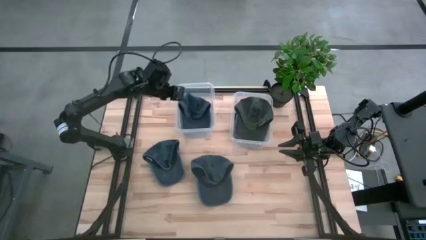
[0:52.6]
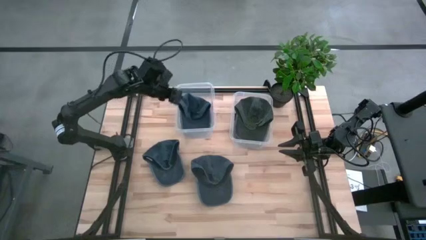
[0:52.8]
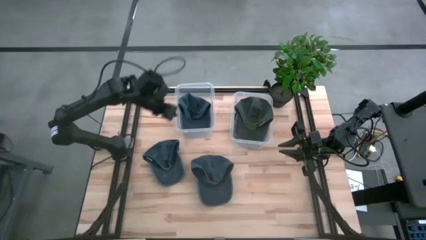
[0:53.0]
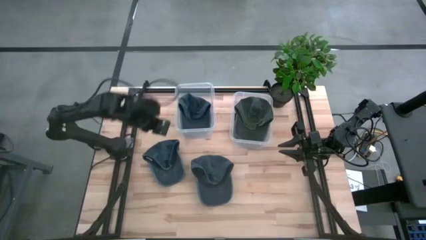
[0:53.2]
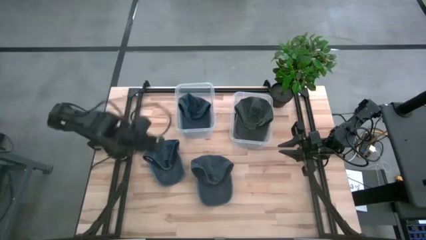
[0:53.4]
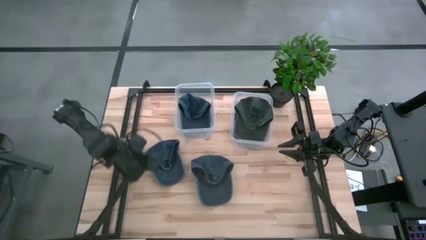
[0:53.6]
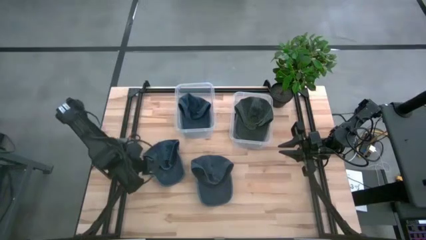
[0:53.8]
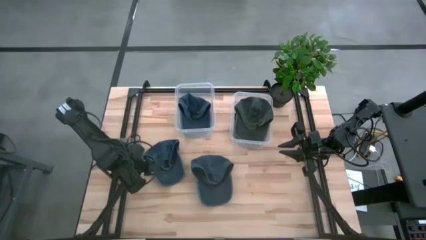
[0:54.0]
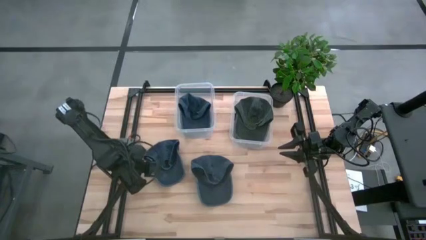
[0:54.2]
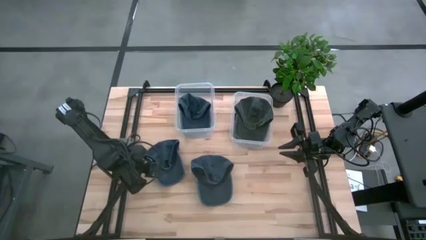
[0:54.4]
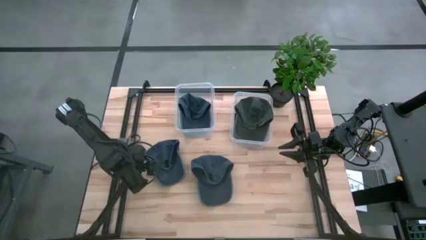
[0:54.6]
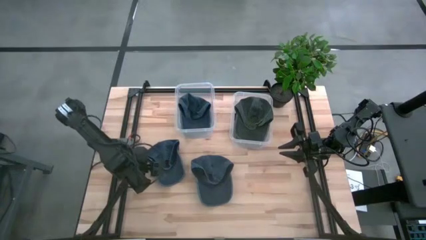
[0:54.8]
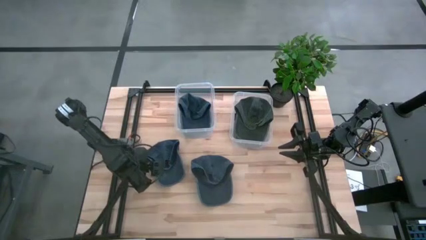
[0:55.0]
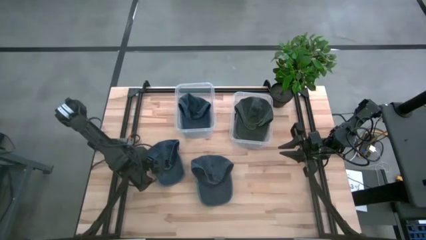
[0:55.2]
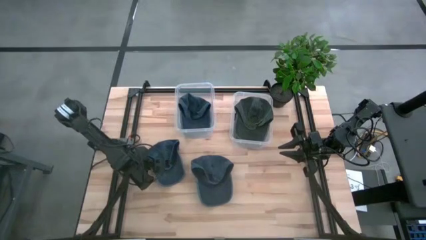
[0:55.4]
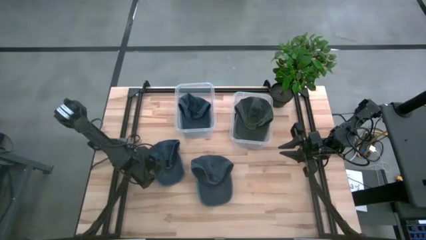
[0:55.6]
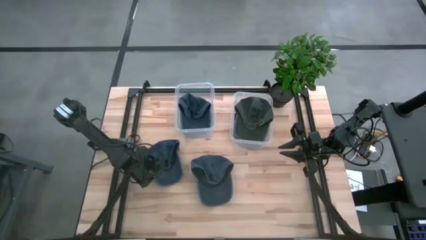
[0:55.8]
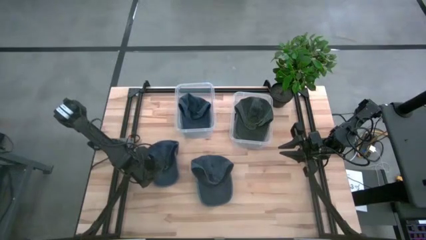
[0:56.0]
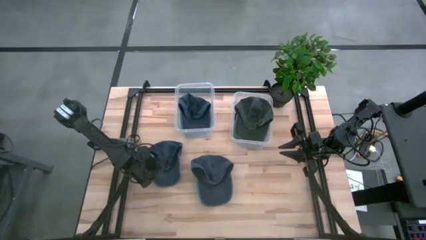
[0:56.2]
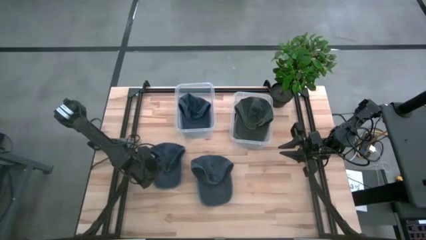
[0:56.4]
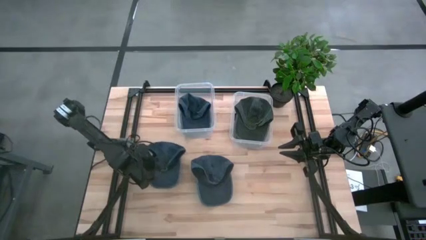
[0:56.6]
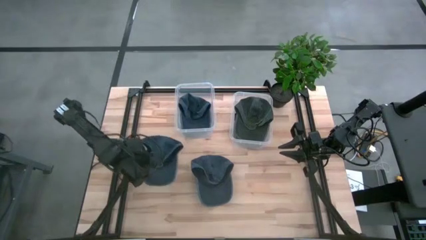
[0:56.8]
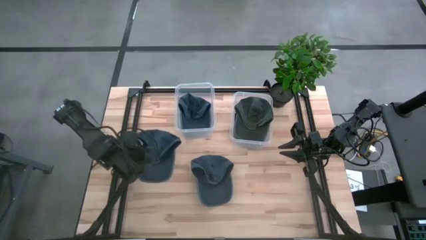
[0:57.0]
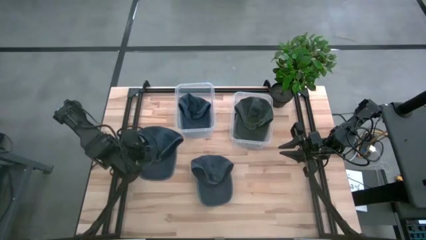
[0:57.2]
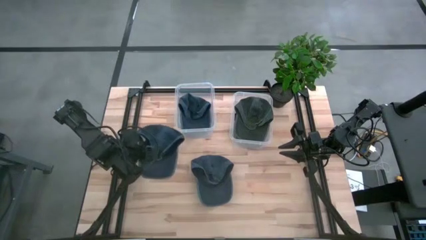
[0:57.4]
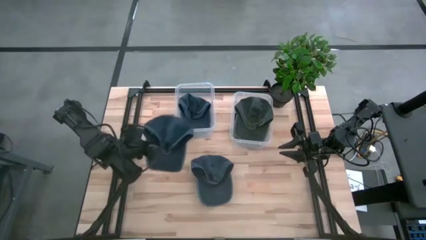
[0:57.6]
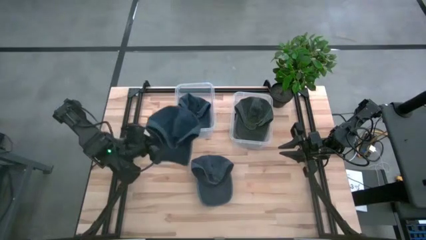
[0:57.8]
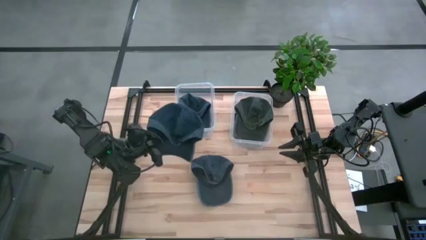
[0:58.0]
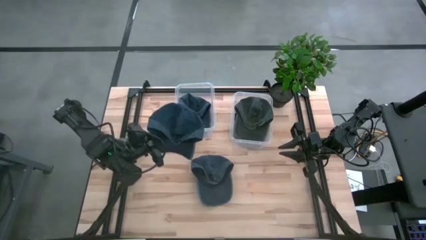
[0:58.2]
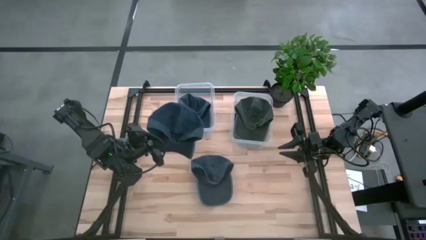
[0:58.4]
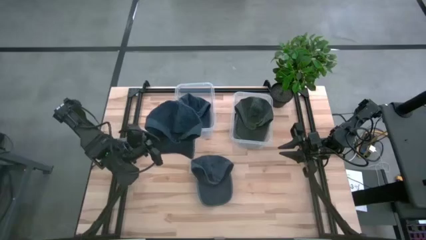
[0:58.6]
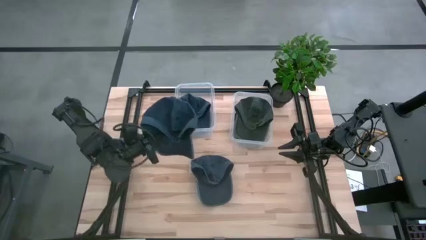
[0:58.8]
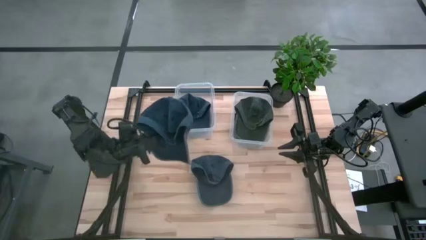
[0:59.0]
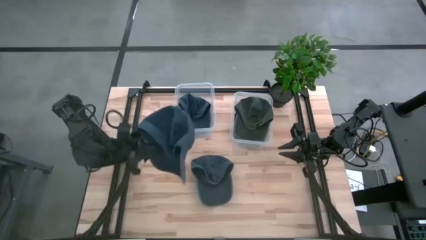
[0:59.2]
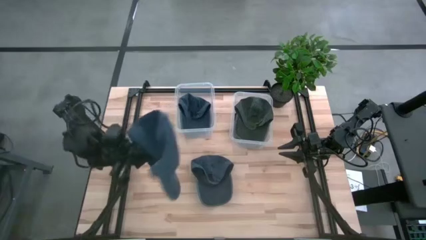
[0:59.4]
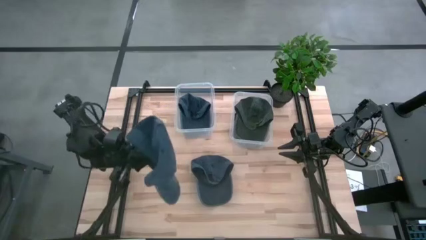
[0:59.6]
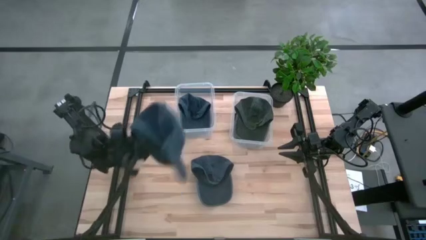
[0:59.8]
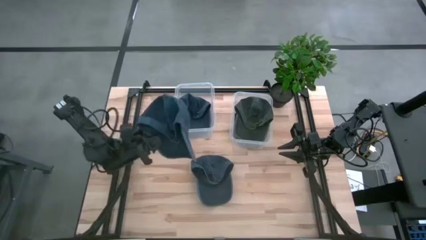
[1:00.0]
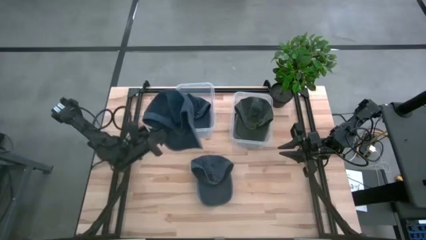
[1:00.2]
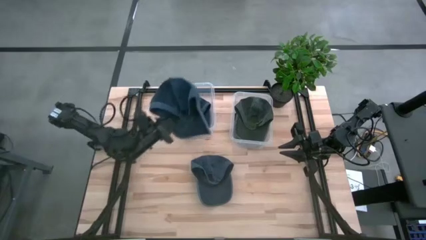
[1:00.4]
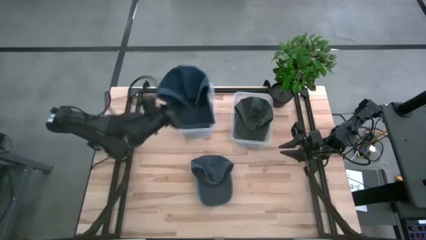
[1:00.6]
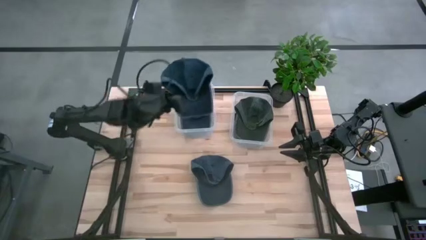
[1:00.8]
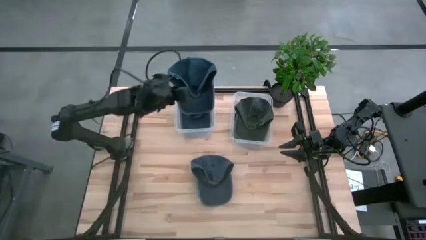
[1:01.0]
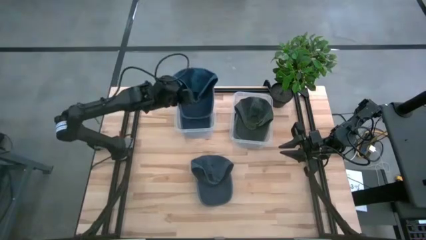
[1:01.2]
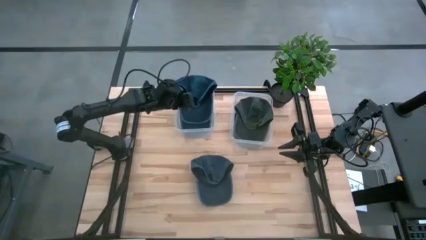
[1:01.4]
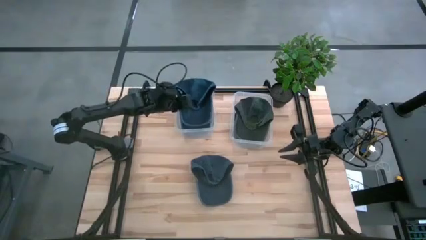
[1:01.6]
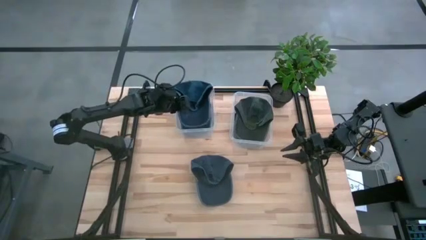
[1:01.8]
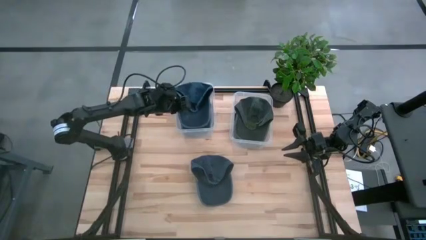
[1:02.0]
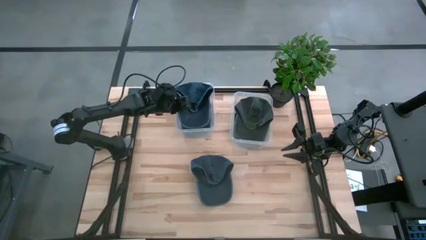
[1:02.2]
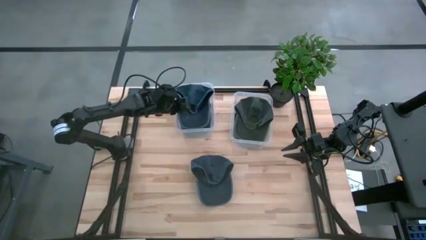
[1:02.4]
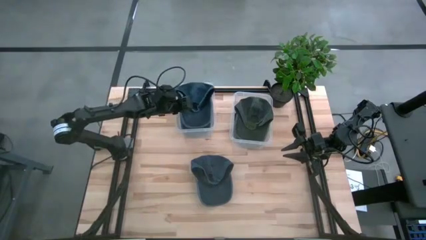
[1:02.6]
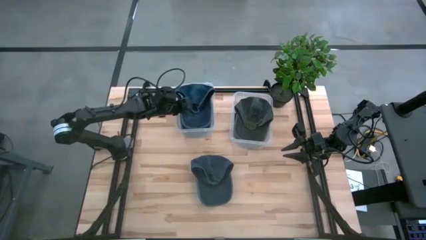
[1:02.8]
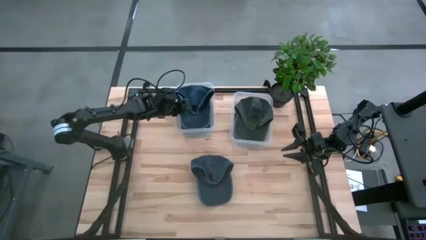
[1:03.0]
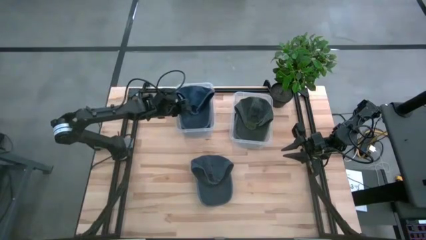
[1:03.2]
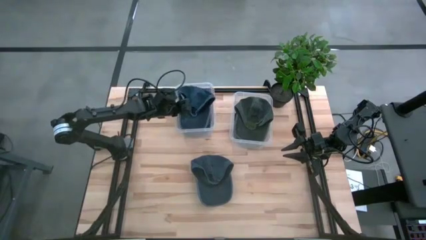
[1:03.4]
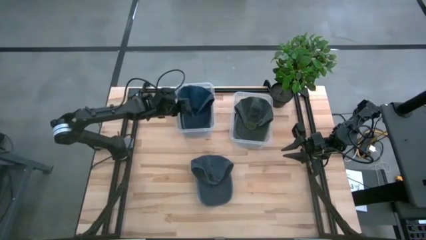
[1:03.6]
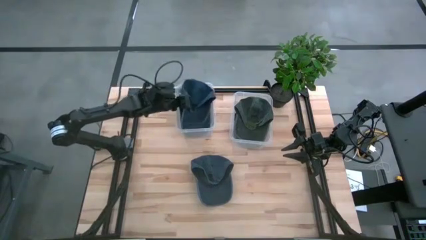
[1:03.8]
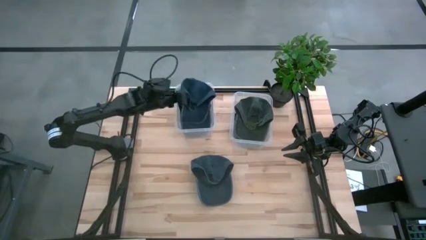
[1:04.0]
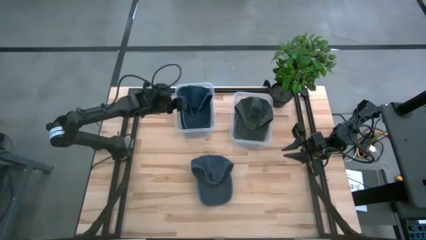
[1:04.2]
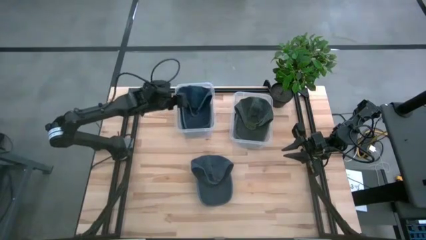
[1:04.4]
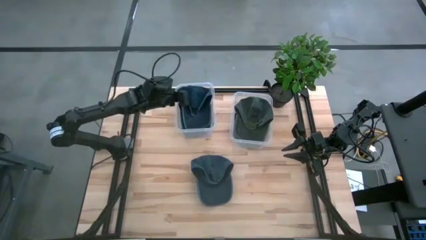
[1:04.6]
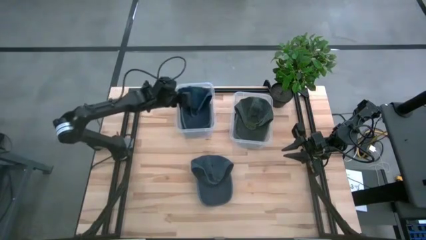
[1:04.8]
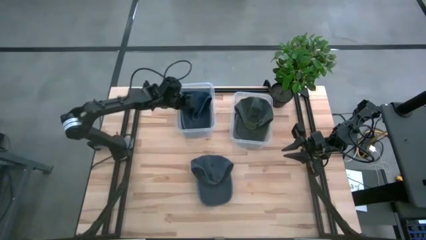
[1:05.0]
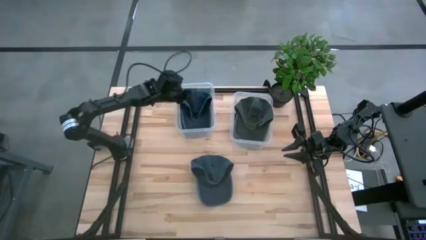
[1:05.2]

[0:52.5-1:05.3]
Task: Pick & Place hat
Put the top gray cap into the left transparent bin

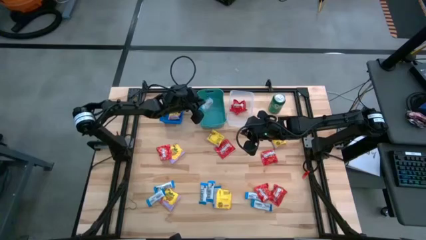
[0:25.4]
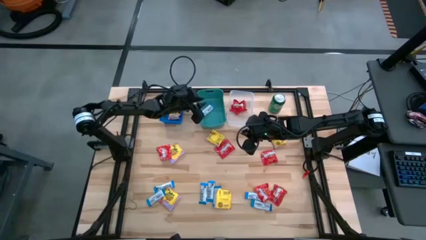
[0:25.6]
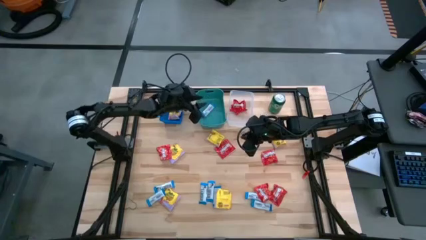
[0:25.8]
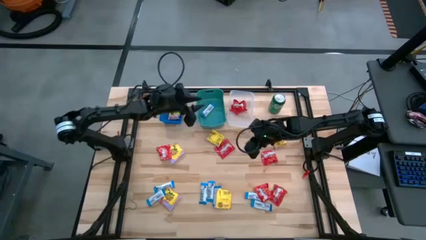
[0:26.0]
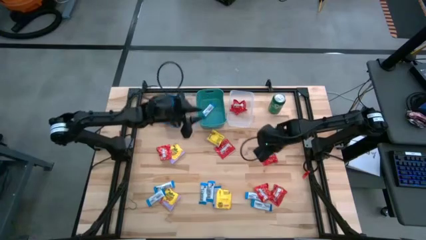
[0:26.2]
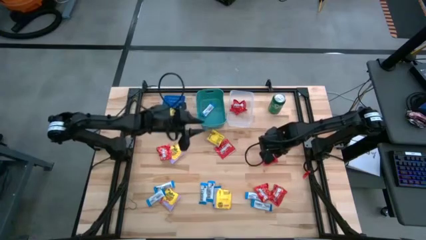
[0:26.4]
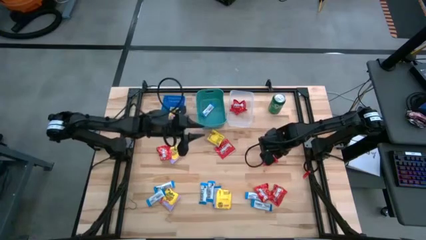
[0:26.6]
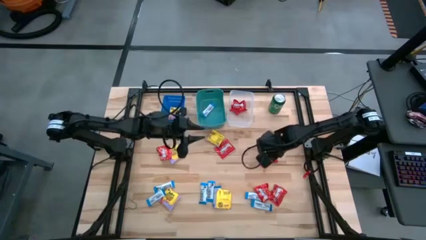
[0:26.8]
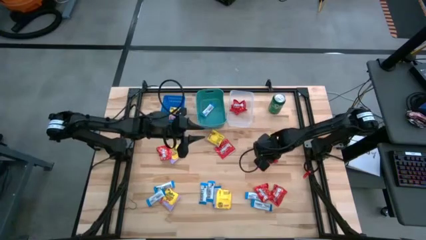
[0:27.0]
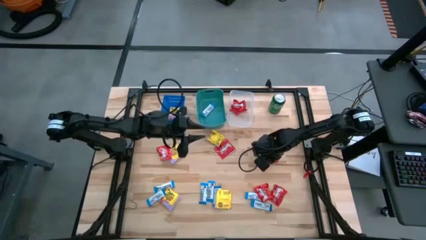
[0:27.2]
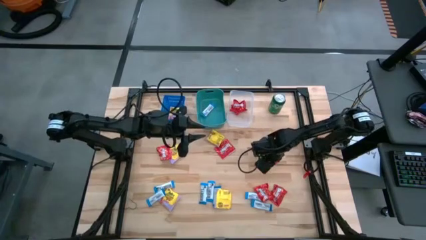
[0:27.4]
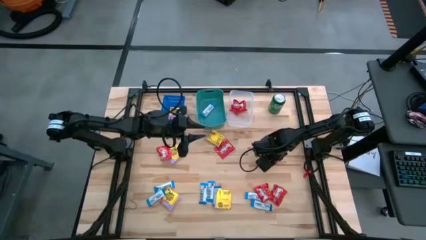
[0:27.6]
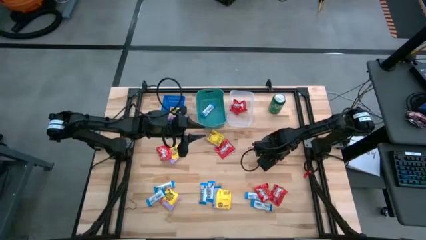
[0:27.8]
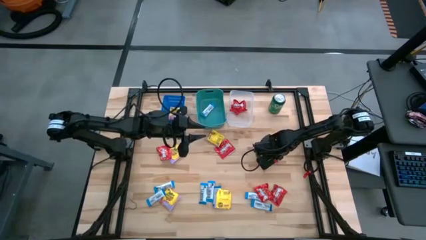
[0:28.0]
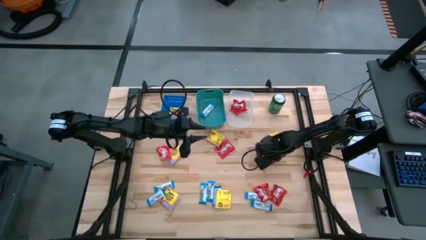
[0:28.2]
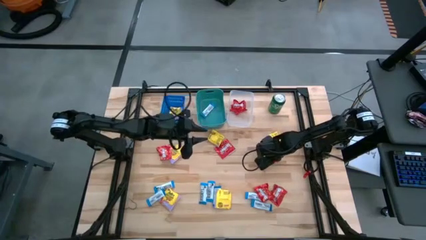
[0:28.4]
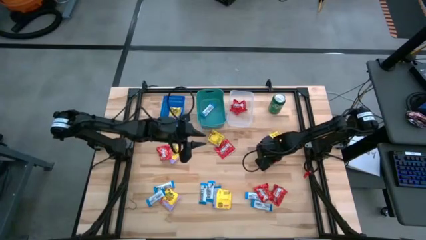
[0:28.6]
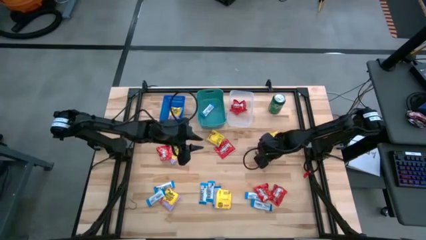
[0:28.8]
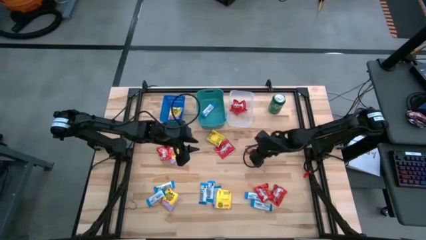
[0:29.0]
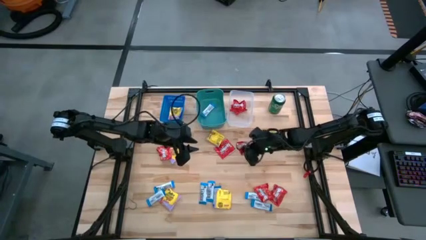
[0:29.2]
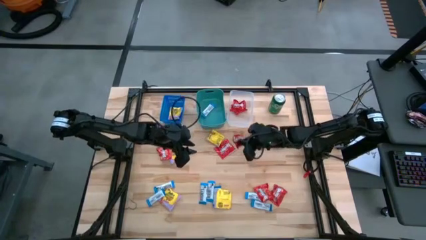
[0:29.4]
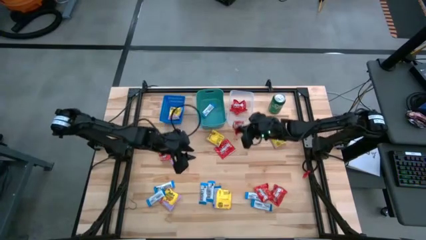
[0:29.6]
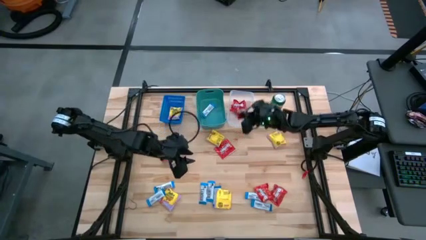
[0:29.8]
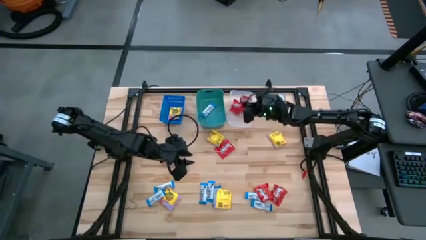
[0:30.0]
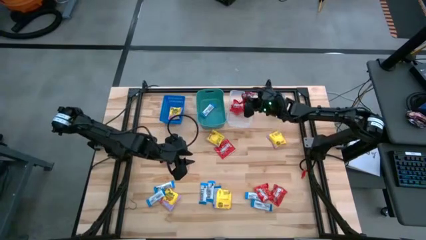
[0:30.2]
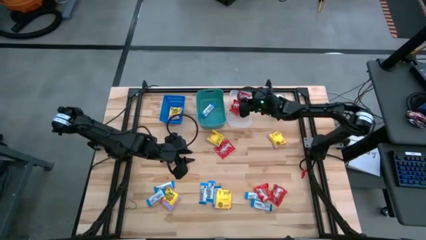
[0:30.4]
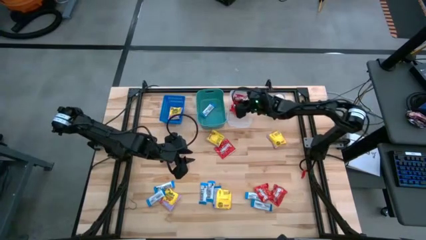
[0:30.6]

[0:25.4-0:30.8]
Task: Sort candy
Put the red candy into the transparent bin
